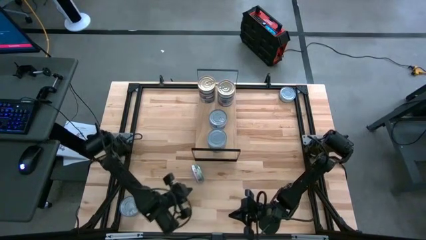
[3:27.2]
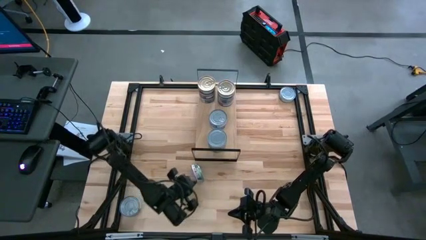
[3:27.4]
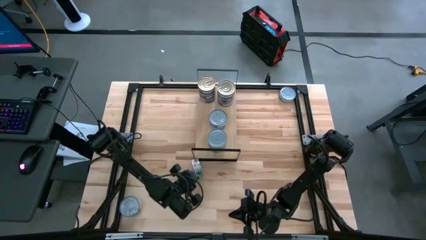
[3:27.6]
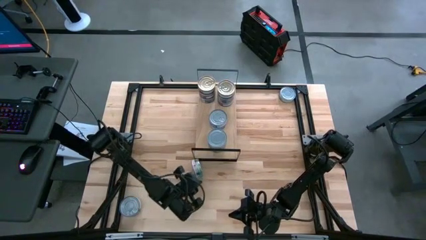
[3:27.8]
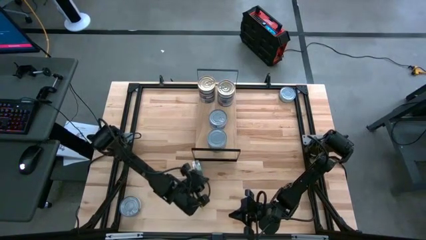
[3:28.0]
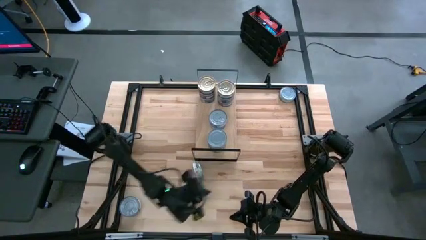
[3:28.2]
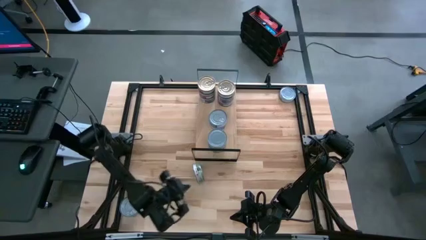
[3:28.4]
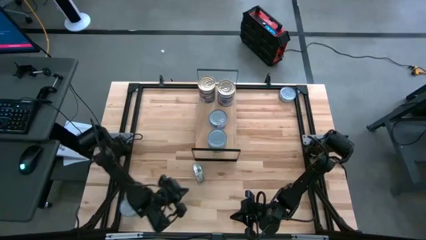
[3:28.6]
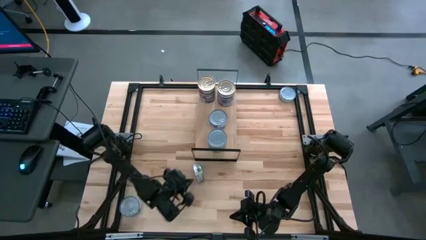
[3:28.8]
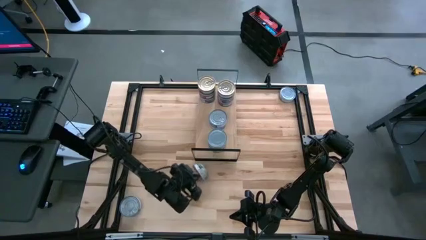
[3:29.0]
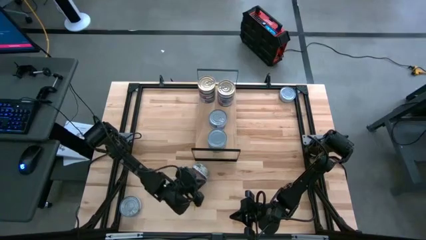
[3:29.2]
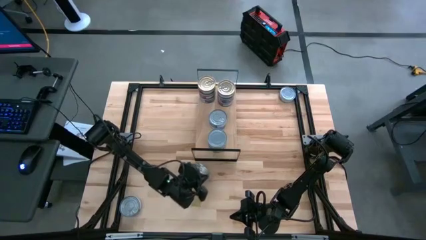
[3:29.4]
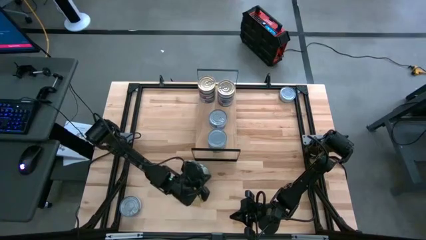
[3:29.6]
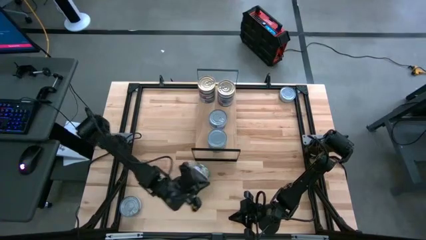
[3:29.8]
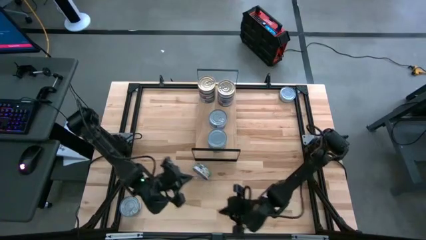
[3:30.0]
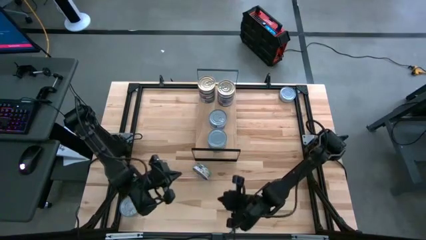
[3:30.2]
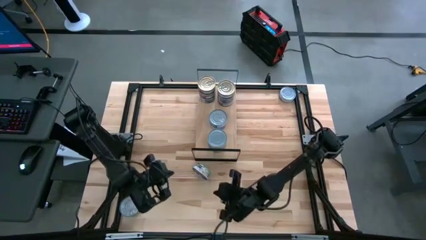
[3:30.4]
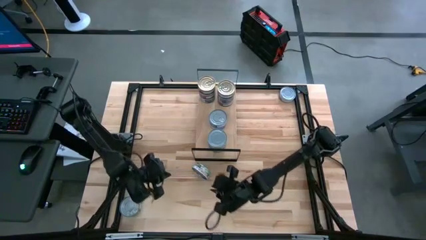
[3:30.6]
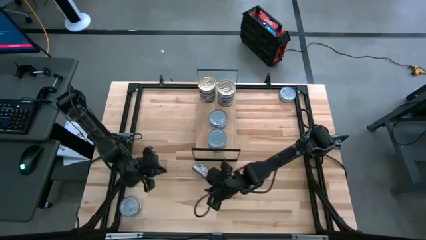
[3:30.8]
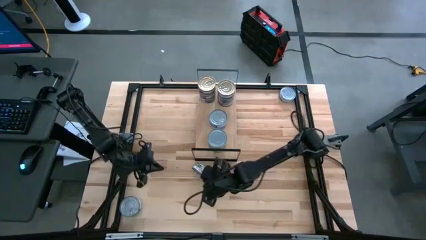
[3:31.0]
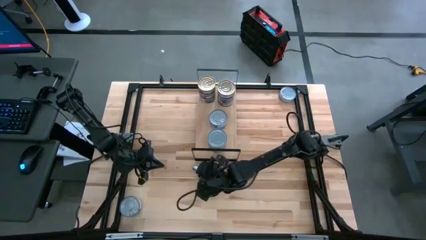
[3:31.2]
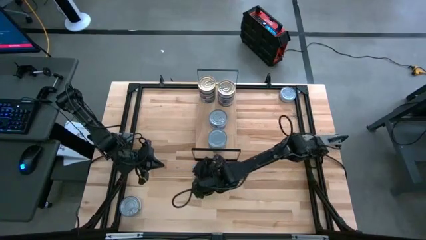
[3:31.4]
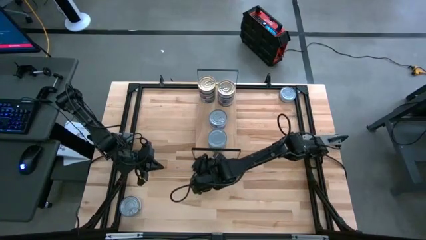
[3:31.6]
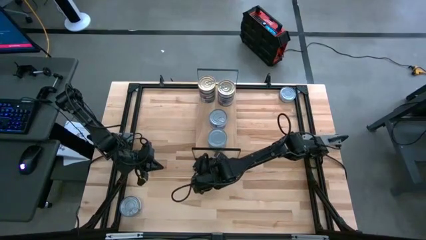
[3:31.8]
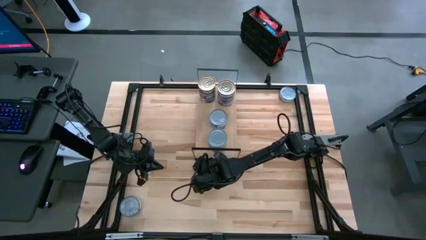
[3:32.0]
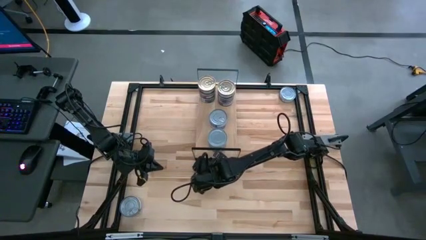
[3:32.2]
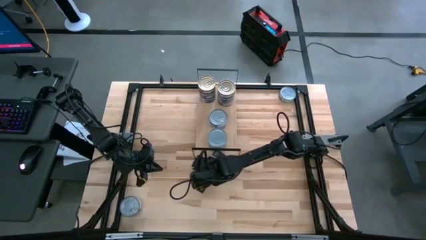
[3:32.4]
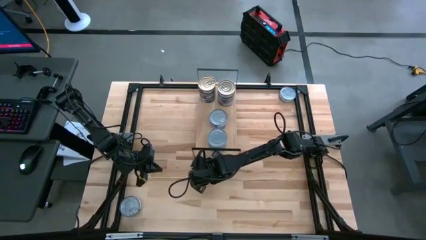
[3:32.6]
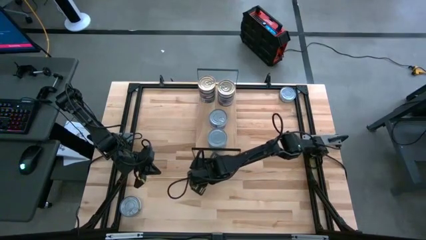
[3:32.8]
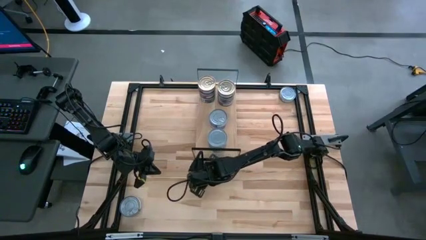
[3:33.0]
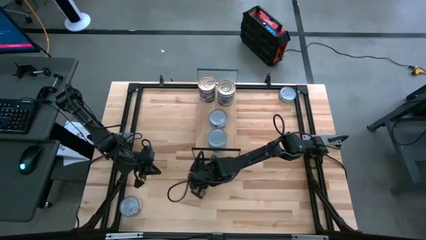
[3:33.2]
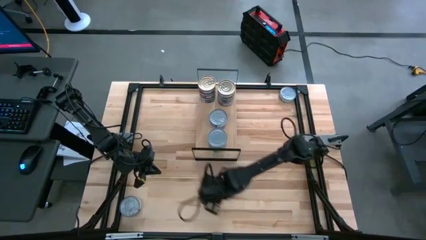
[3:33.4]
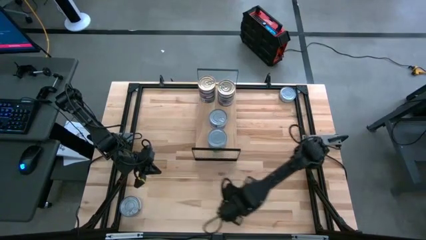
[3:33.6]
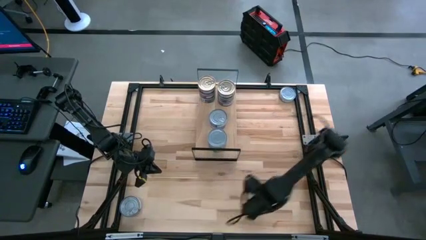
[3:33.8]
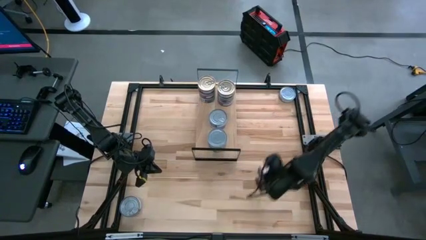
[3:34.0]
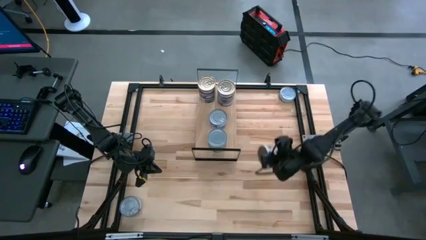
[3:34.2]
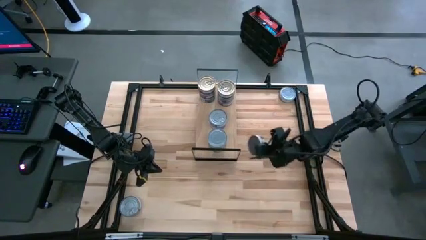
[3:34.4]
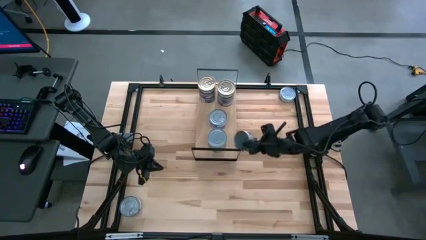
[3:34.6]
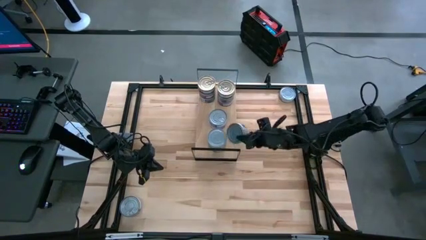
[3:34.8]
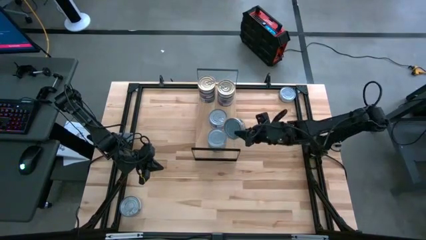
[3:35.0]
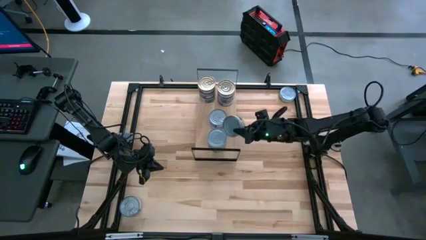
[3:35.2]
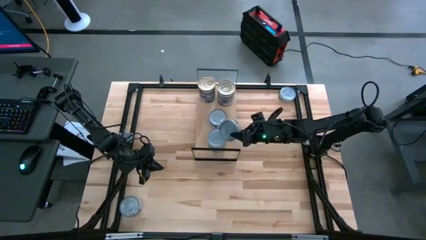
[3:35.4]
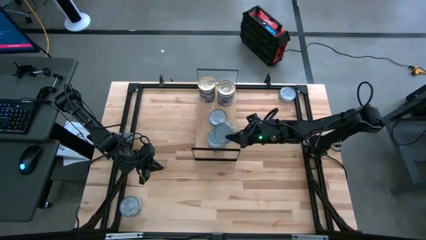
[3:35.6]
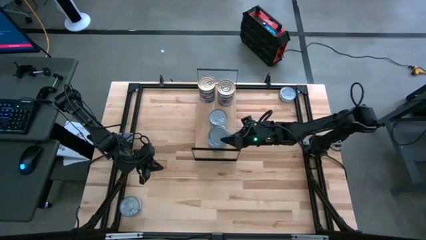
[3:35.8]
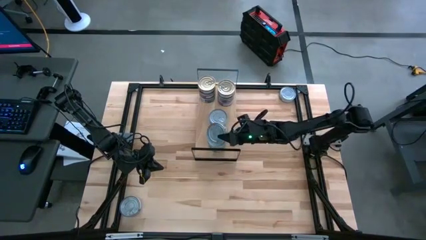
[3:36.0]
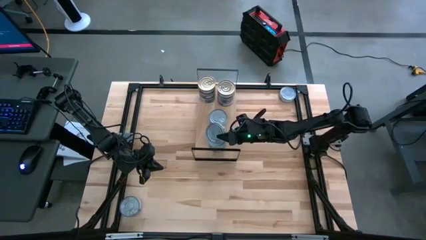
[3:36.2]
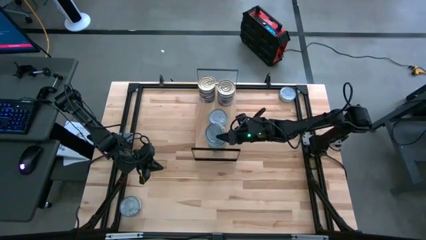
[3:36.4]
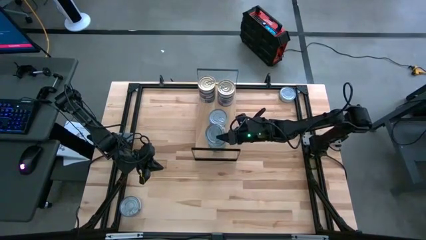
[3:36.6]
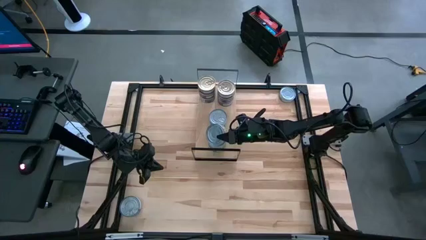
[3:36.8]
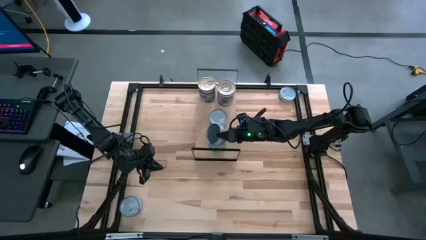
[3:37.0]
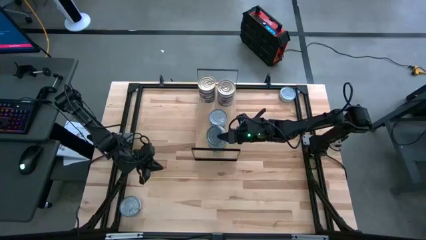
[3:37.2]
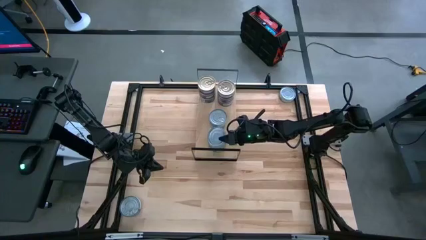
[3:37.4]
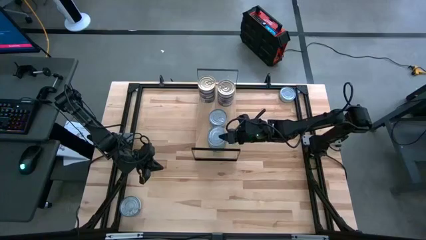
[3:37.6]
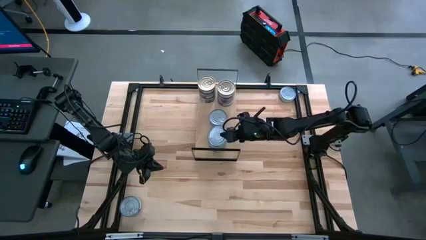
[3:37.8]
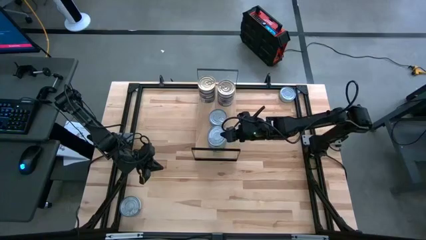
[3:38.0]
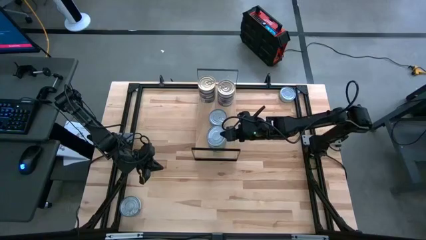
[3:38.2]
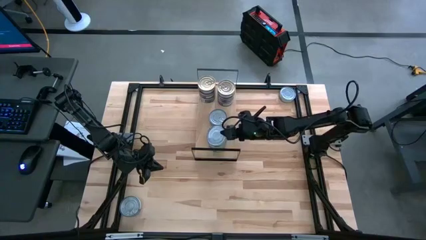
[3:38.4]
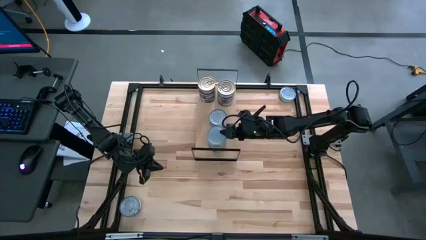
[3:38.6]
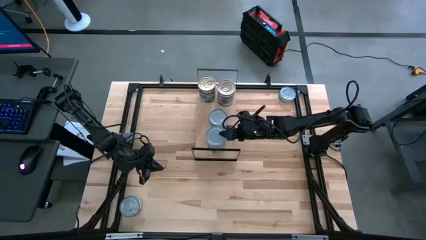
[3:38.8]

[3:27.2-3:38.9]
Task: Stack canned seafood by type on shelf
Stack the green tuna can on top of the other green tuna cans on the shelf
